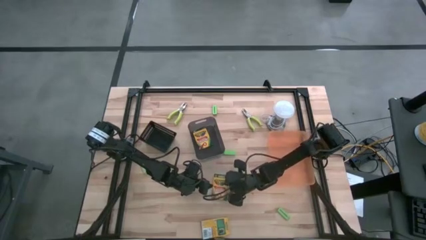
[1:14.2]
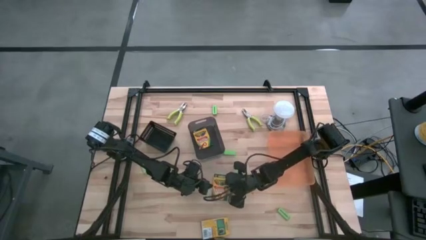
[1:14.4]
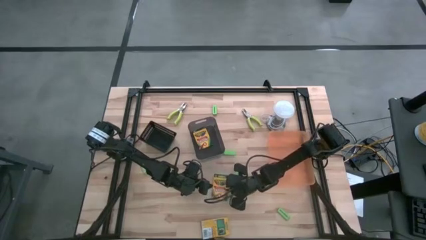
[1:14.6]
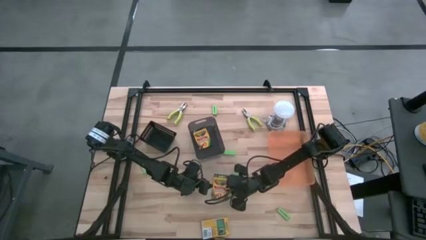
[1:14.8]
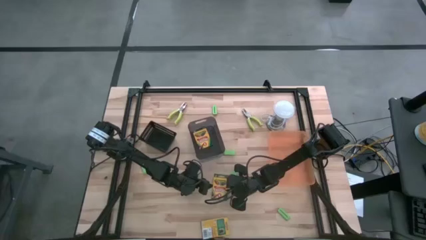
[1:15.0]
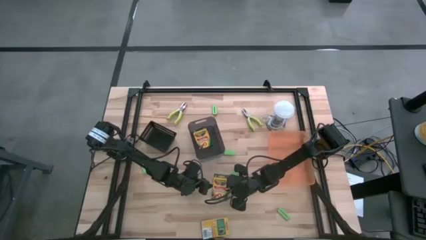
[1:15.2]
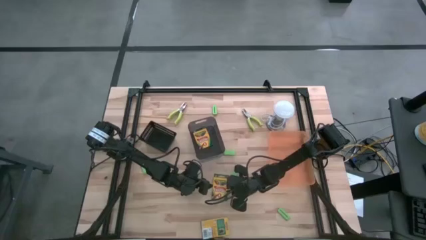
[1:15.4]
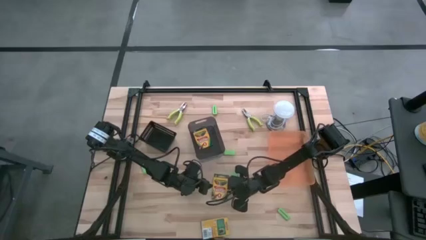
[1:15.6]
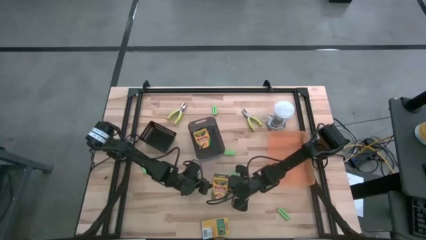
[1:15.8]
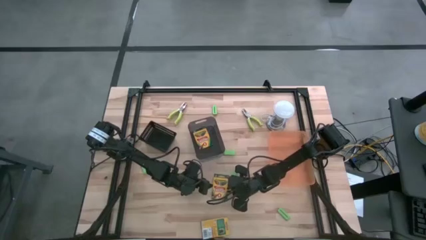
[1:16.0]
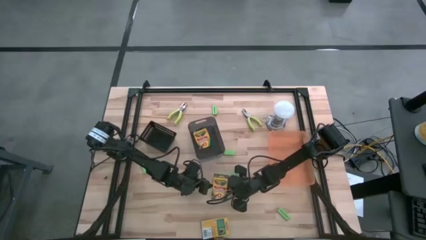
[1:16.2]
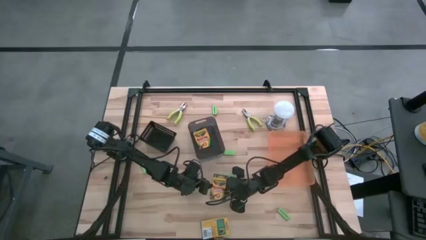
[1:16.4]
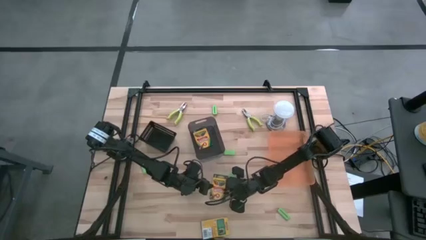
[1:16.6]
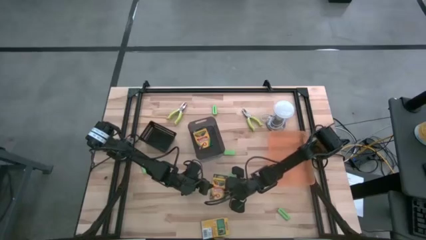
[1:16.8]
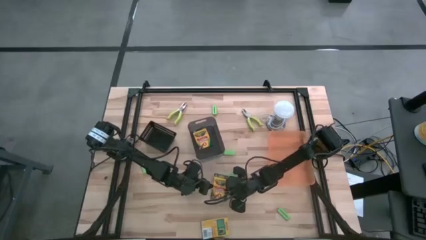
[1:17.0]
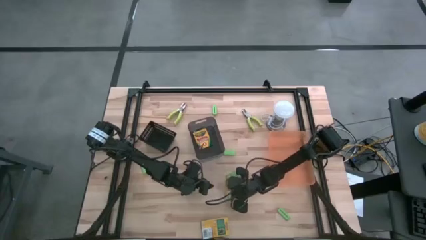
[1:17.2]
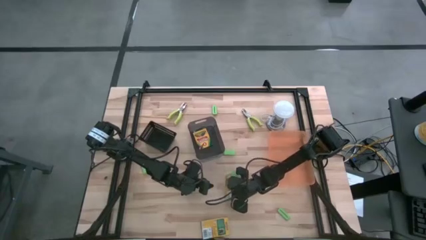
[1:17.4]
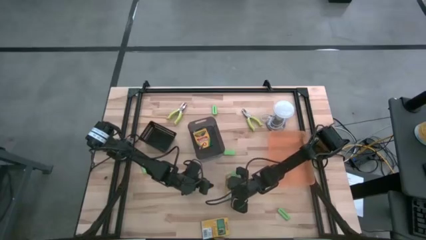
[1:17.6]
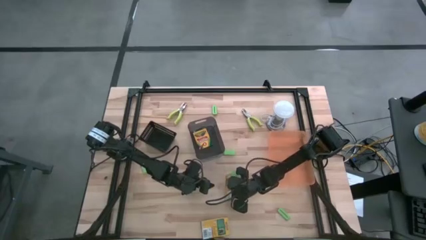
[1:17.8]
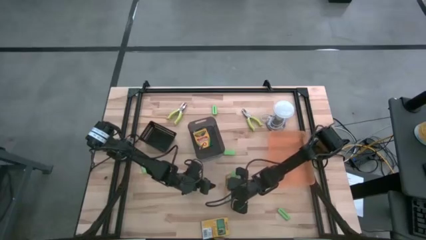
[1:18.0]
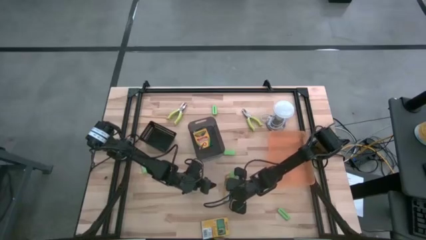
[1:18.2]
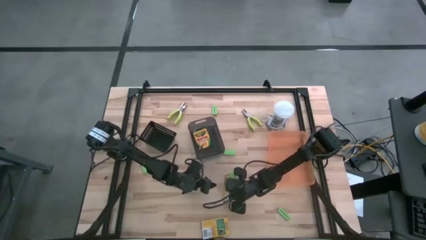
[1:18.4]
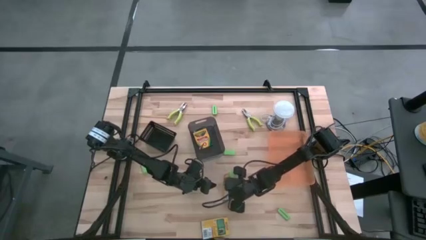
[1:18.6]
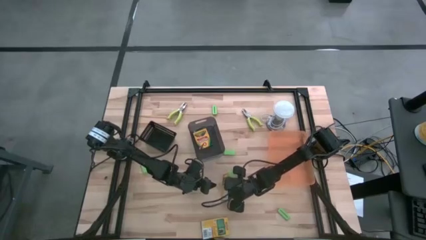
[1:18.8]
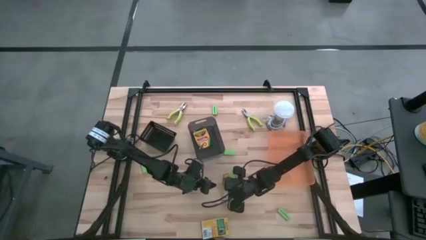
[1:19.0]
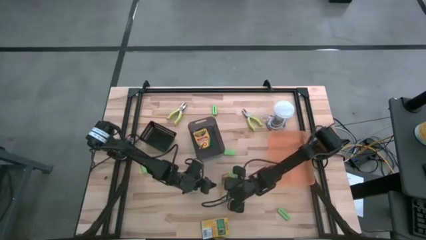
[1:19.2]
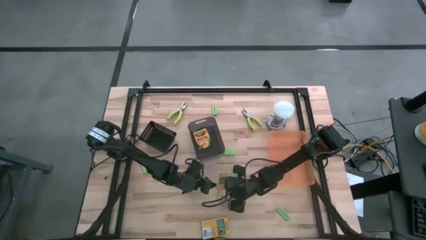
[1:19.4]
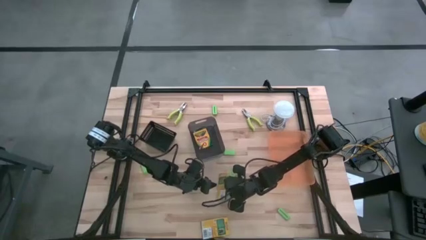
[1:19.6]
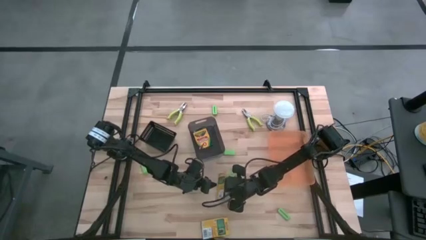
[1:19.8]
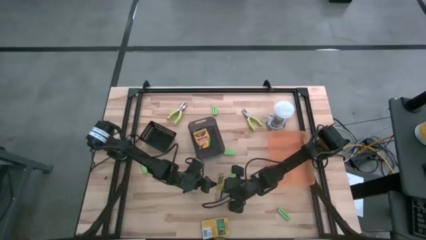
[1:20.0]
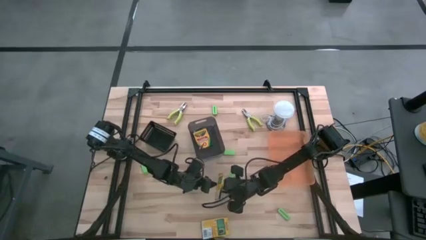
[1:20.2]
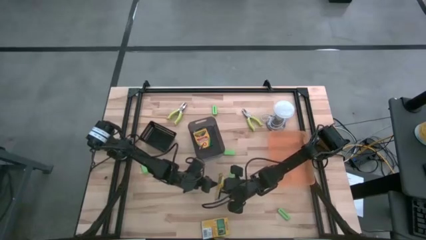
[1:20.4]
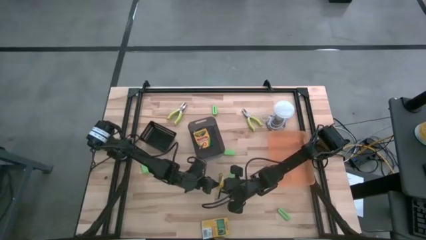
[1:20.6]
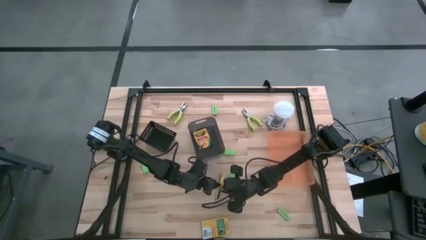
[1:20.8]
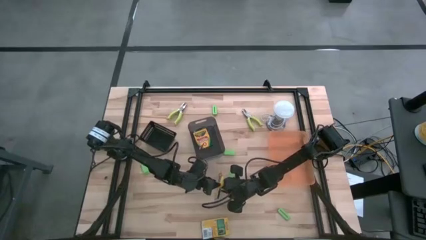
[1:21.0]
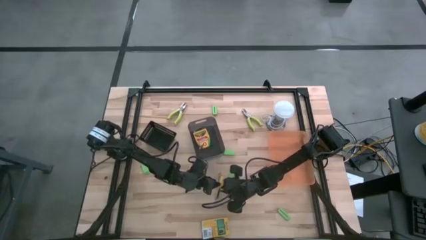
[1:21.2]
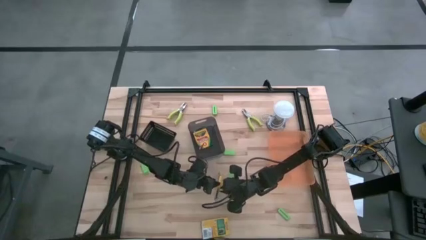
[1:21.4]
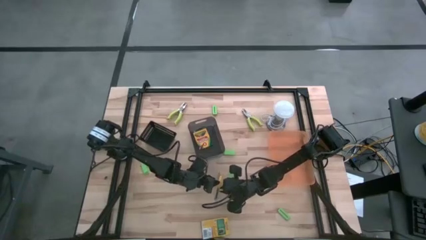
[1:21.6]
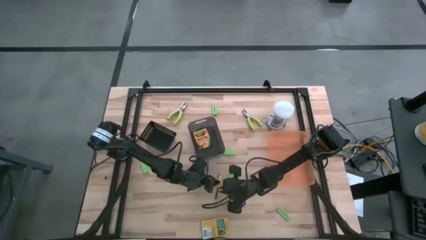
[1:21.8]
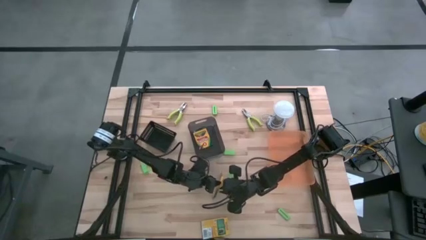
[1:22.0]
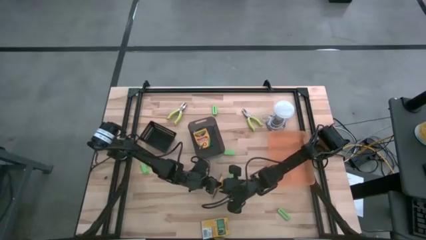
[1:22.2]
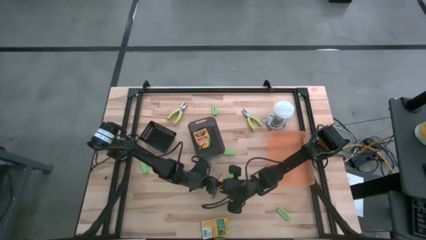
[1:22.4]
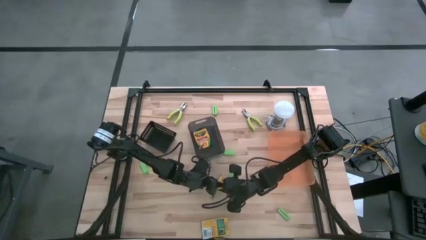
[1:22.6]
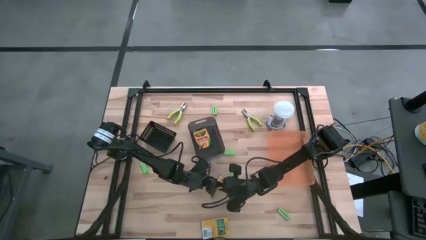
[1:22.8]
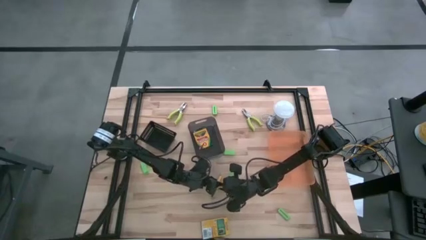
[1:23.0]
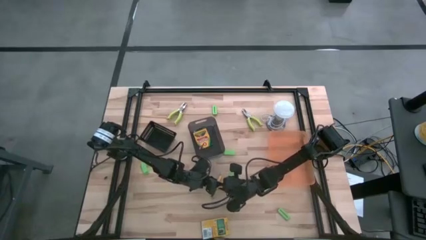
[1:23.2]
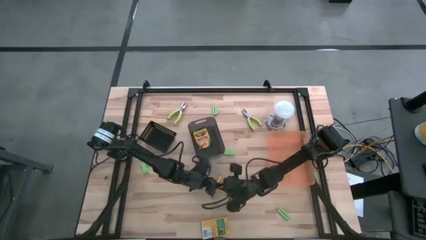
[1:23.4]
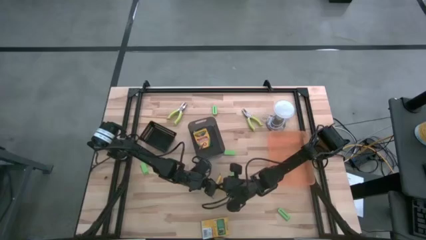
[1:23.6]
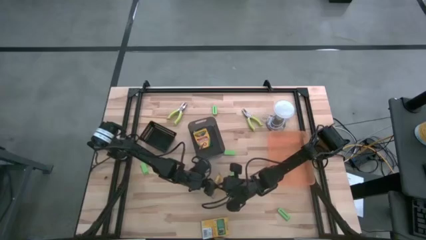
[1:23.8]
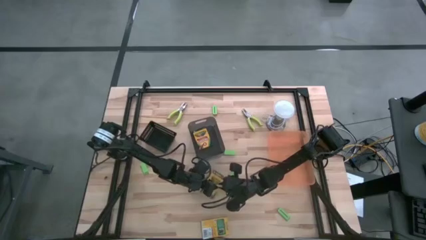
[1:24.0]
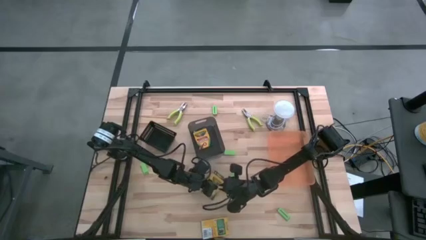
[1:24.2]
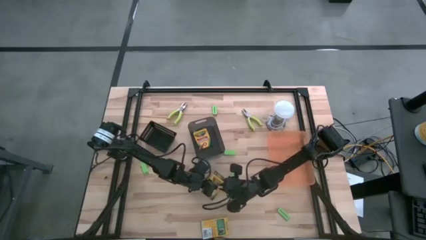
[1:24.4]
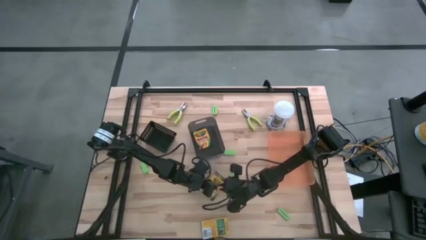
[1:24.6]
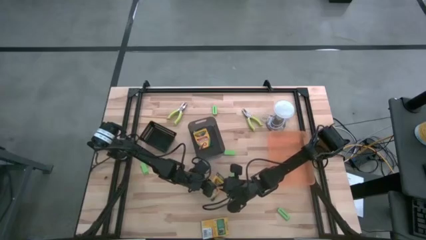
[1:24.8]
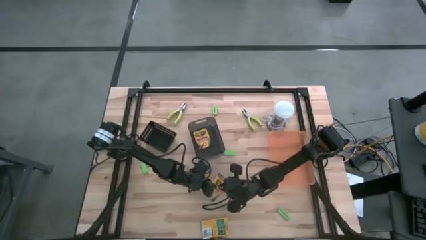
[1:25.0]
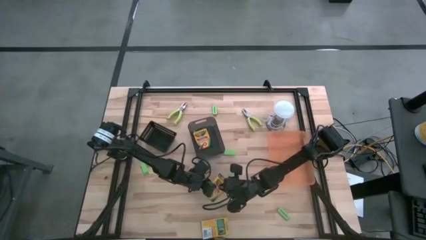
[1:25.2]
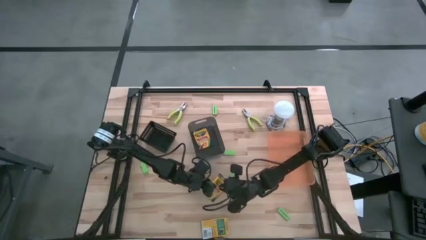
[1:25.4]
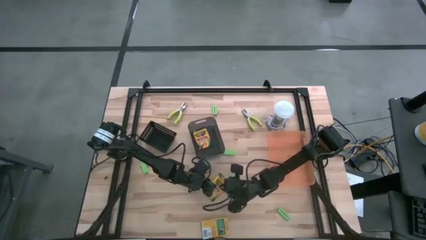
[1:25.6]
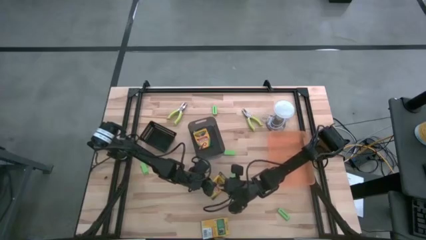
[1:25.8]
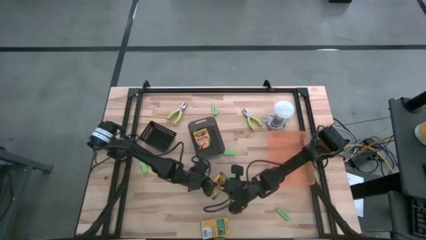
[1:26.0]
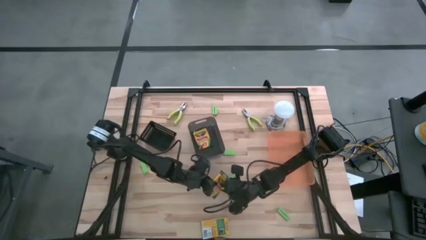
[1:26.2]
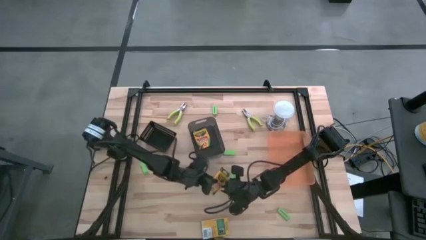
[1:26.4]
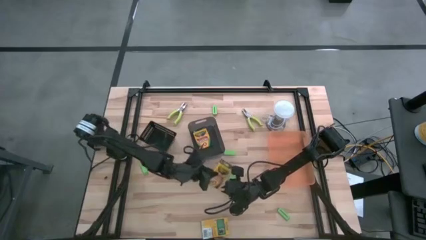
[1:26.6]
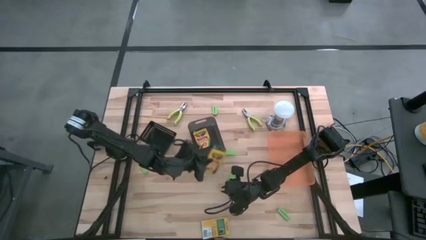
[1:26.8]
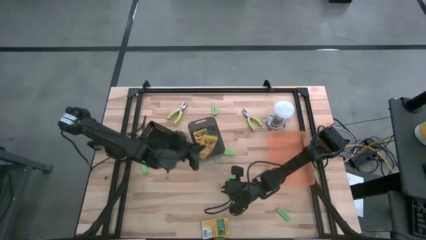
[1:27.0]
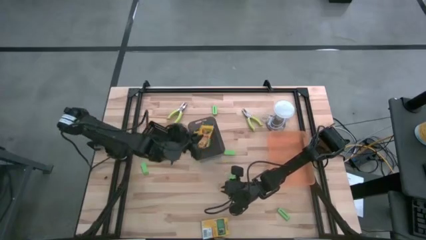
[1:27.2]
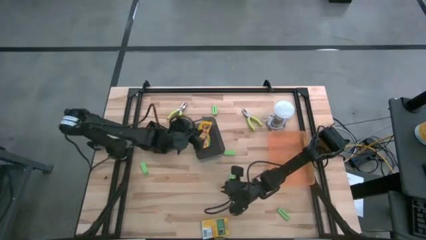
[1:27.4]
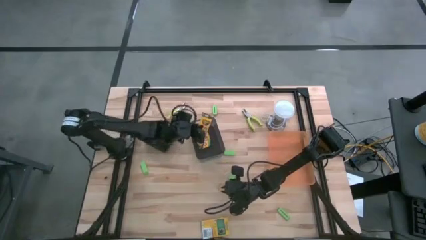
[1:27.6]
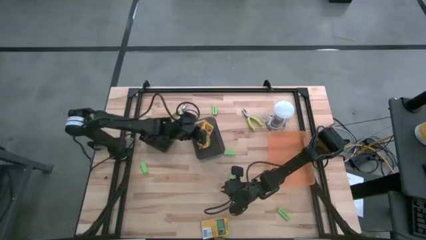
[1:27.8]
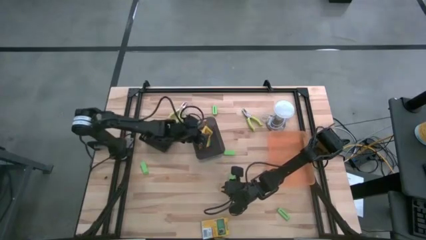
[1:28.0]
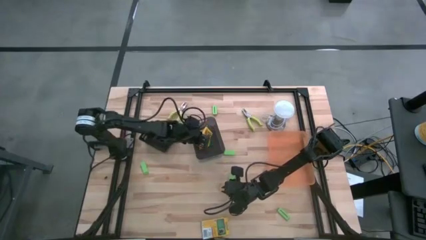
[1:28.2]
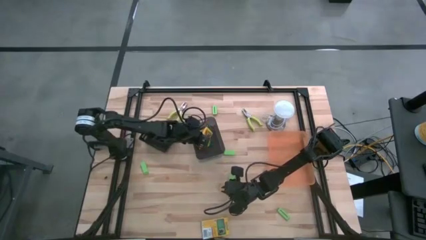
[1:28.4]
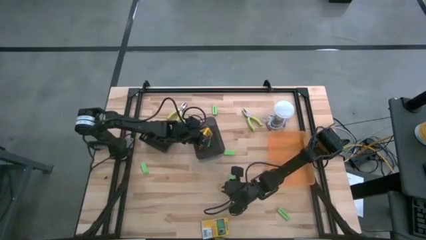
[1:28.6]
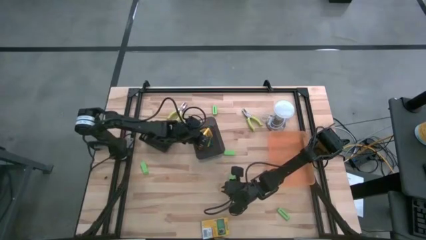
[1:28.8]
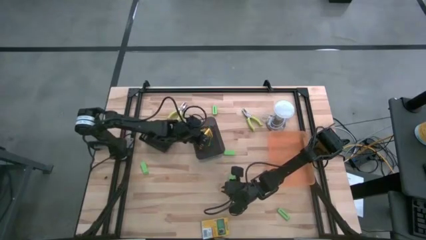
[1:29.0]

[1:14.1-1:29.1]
Task: Pick & Place School Supplies
Put the top yellow crayon box into the black transparent bin

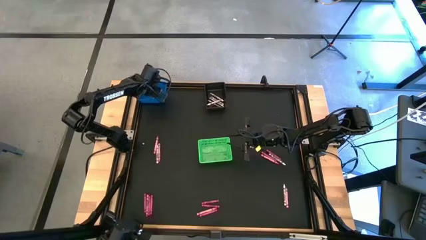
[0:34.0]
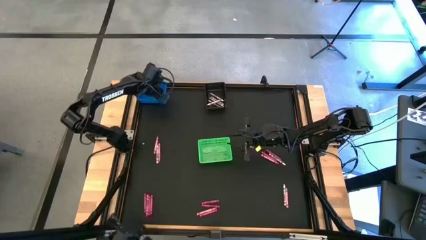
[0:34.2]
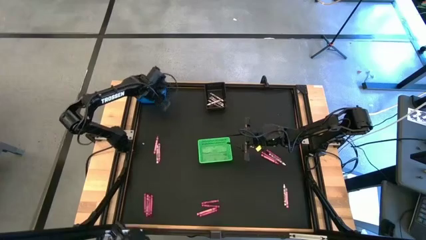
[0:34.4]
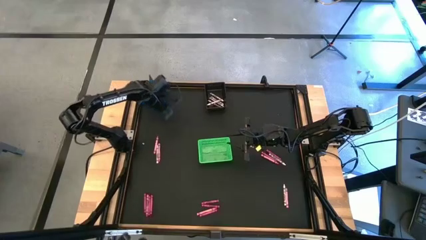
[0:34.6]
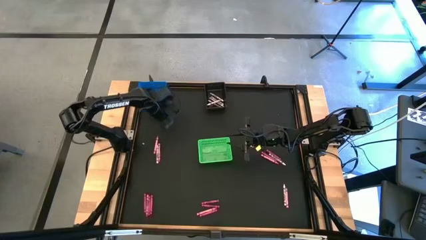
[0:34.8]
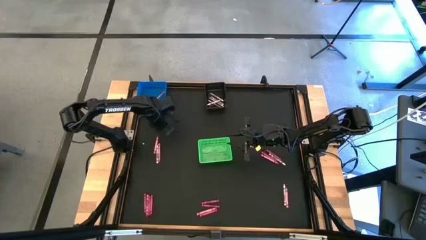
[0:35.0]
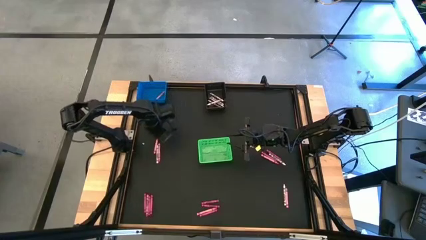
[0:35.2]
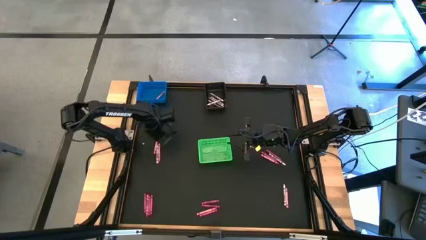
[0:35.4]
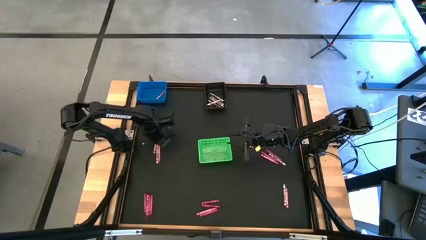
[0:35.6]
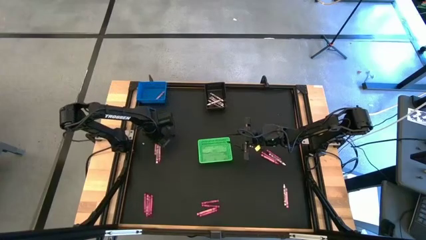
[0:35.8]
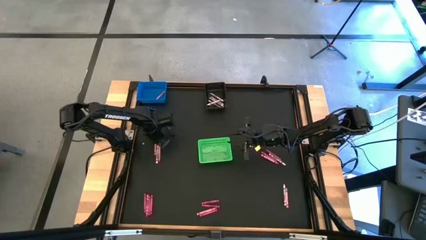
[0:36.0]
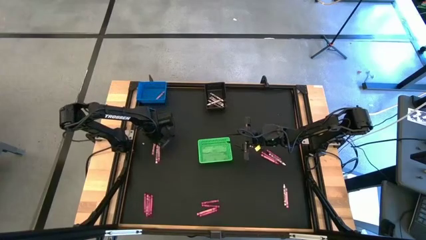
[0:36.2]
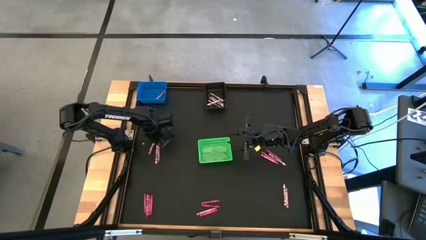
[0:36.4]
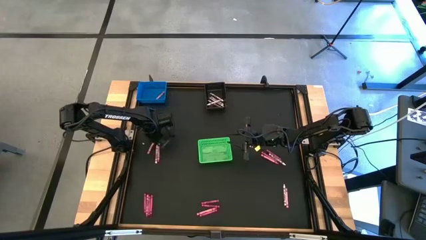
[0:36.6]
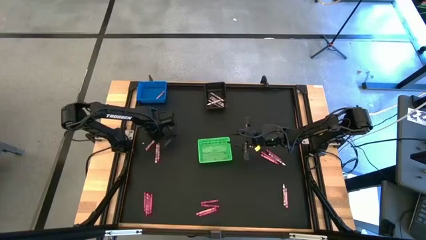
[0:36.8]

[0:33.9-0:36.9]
Task: Sort crayons
Put the pink crayon into the blue bin
